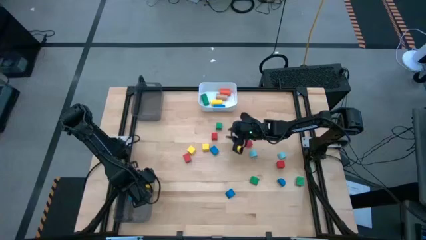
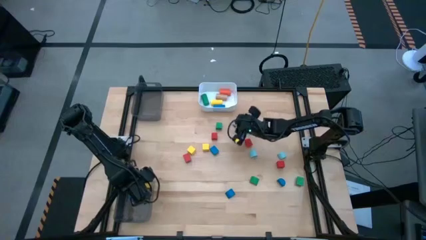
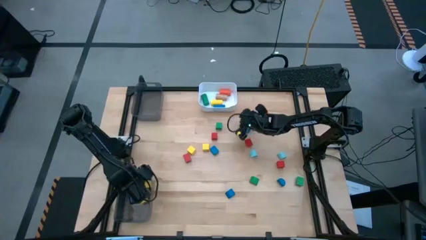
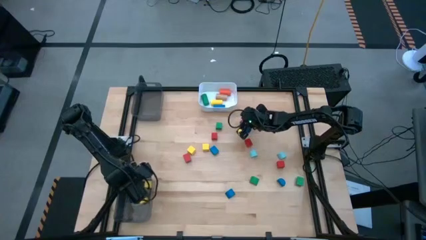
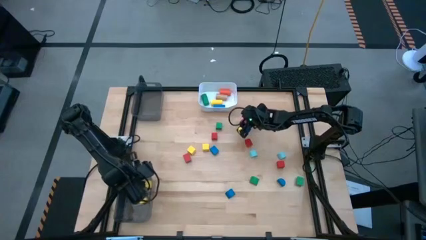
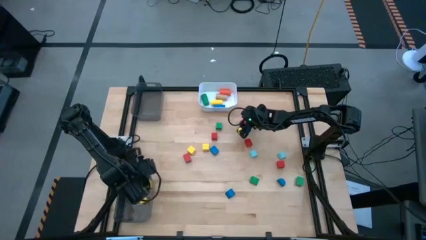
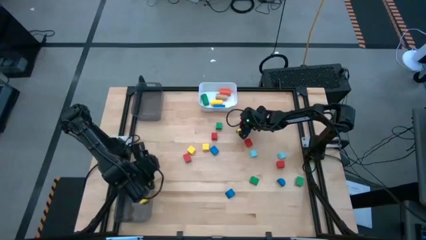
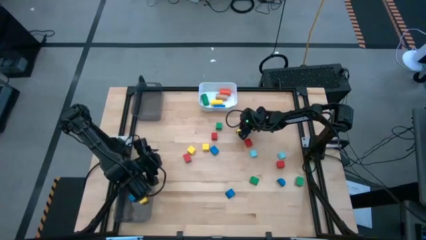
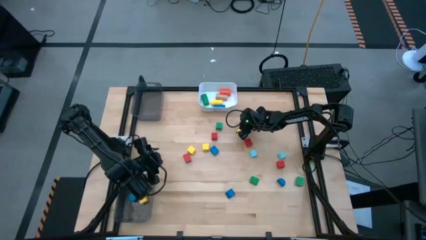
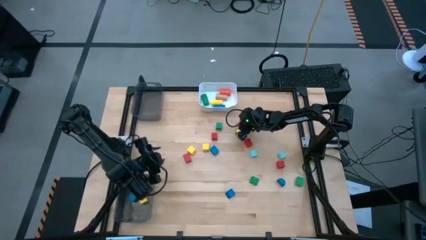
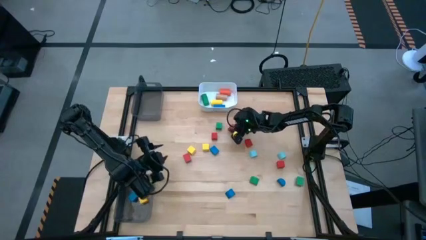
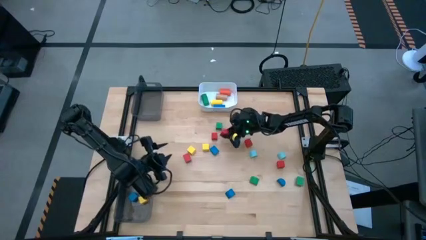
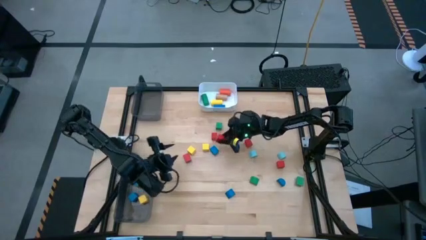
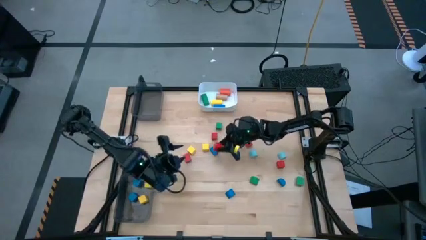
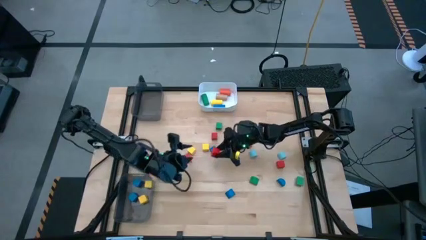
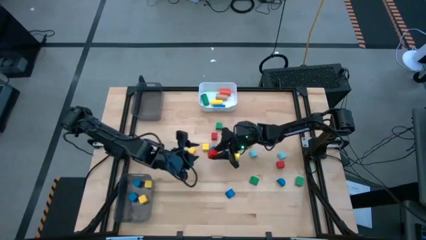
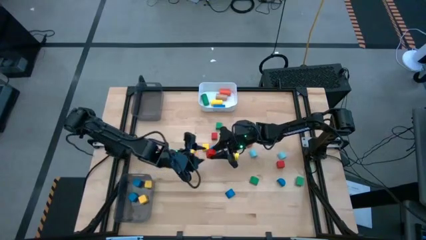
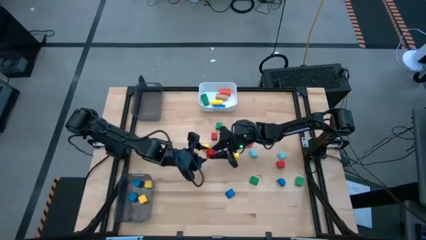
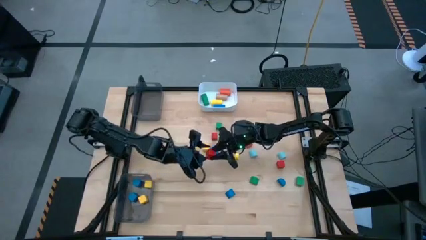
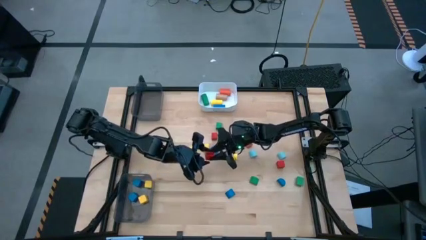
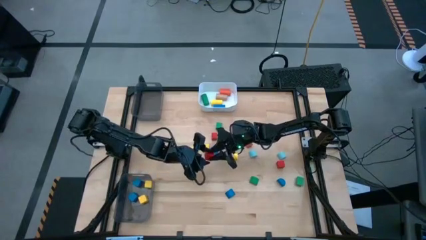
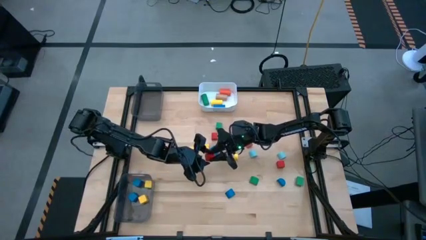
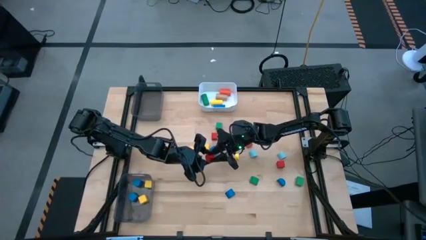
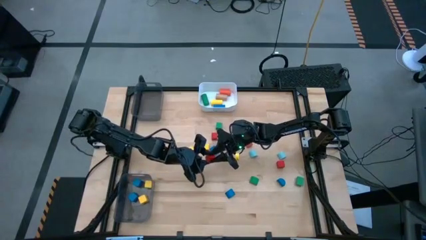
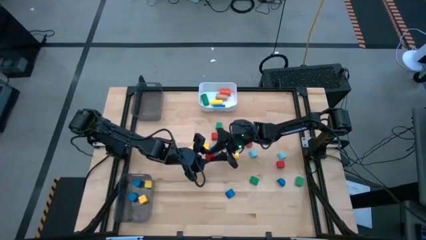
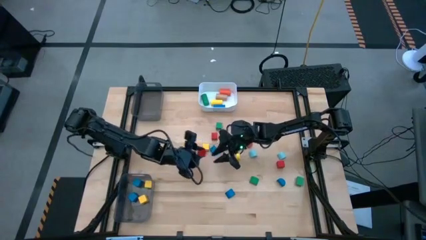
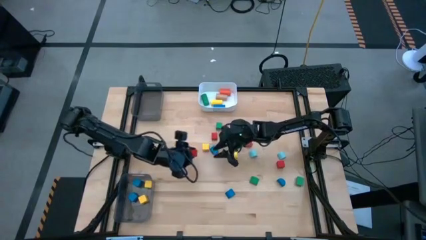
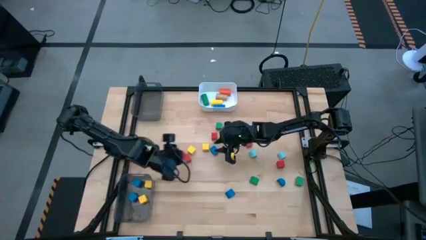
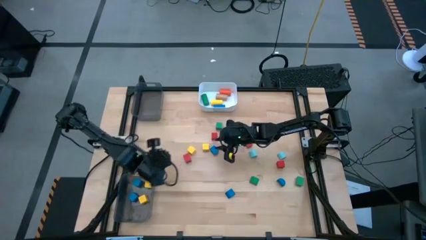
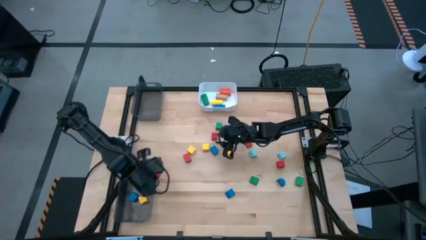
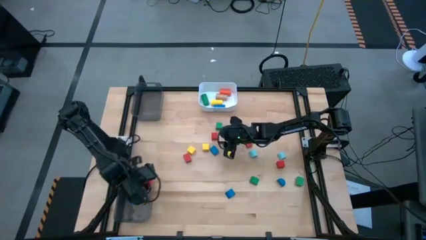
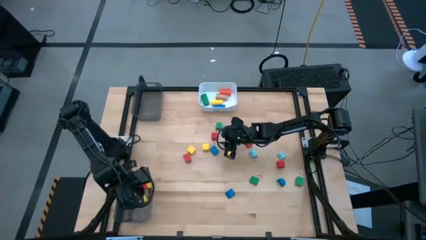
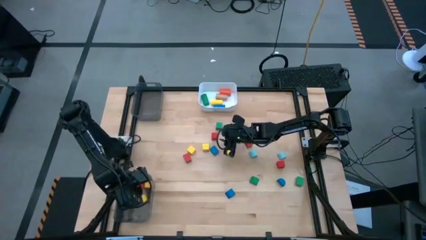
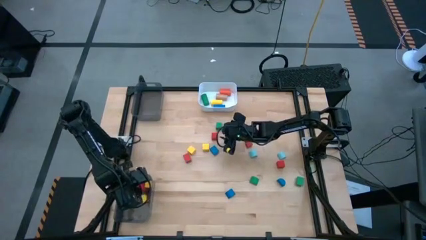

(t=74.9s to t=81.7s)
Task: Sort blocks by size
Put the red square block into the bottom black bin

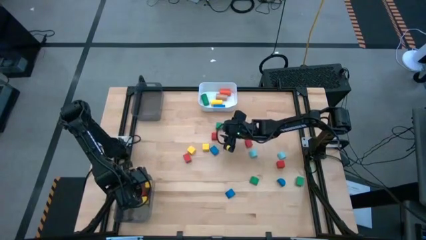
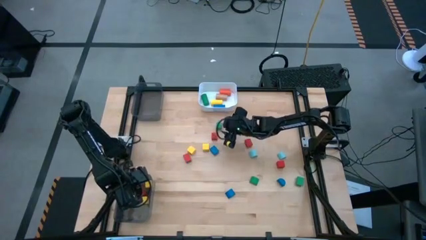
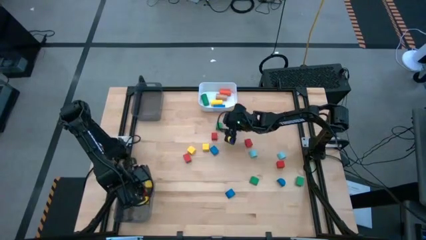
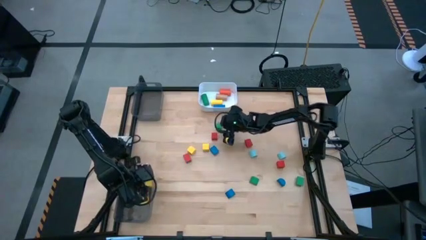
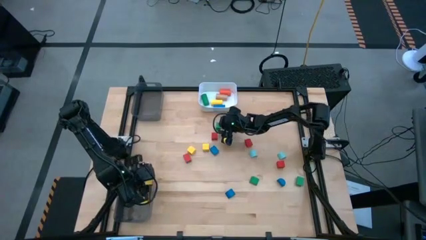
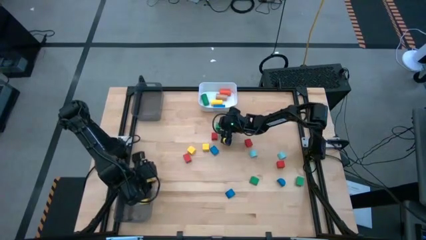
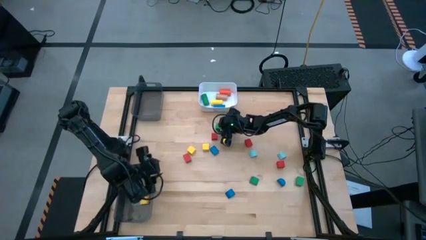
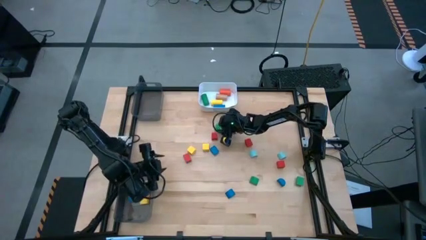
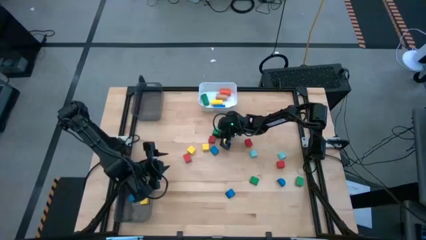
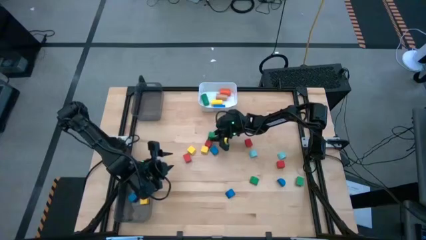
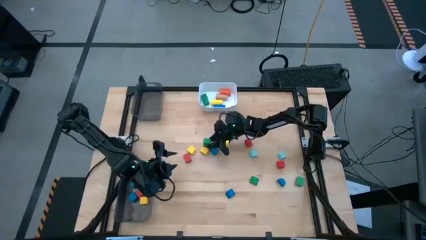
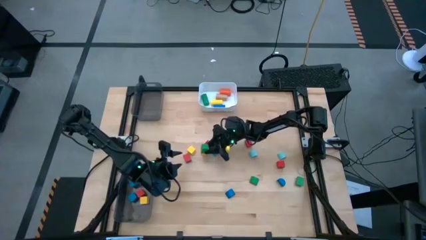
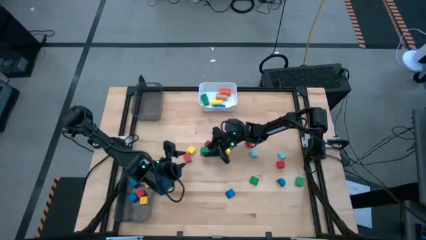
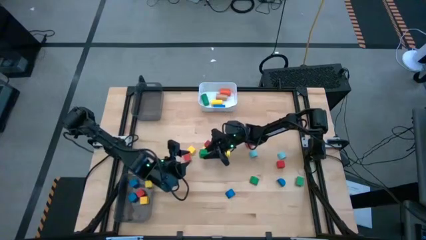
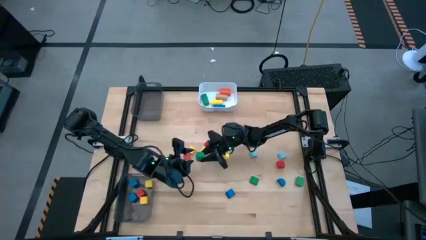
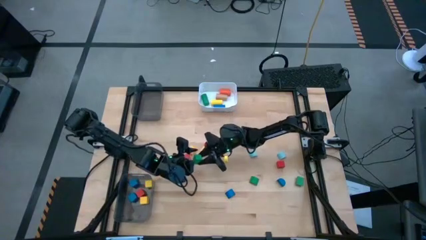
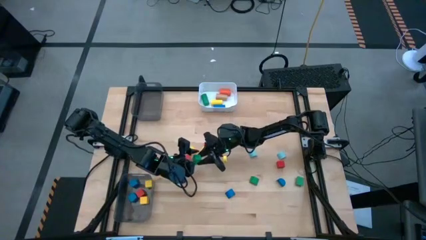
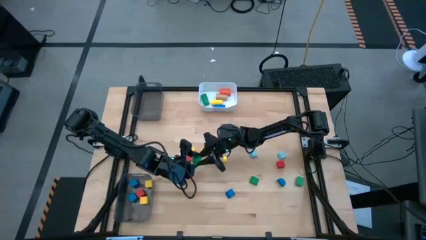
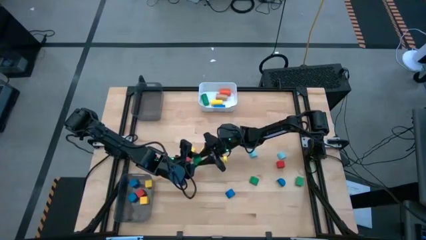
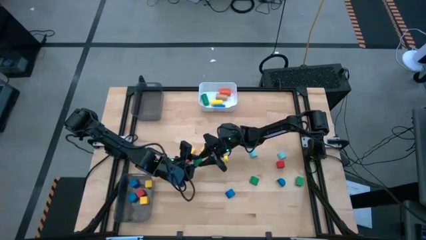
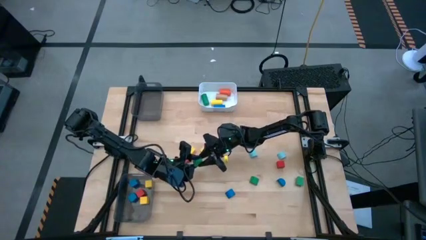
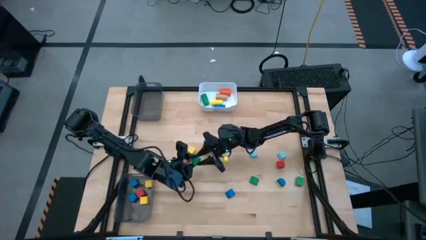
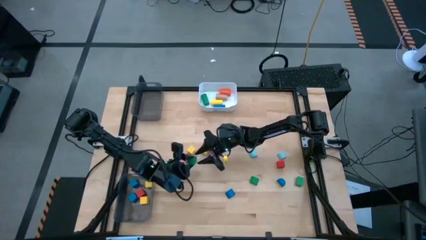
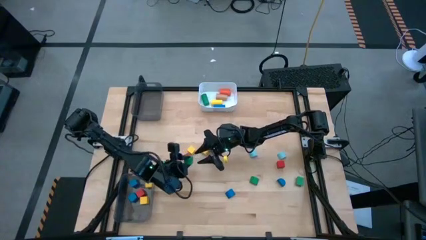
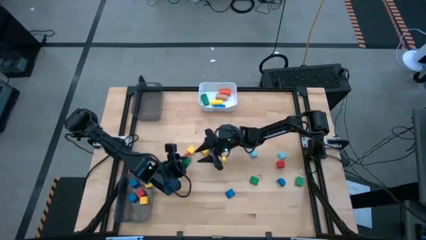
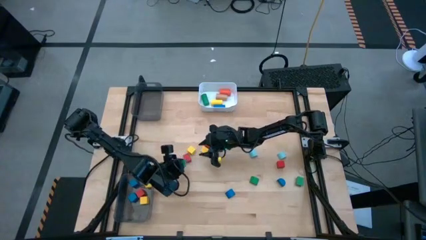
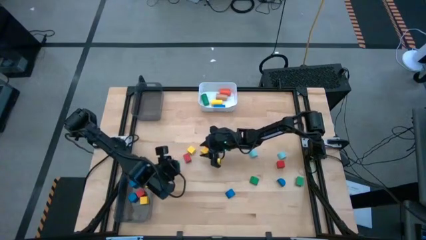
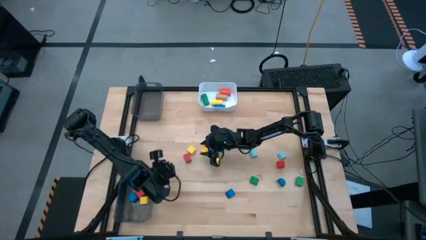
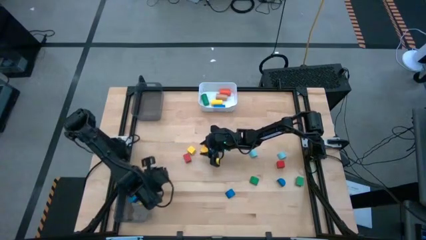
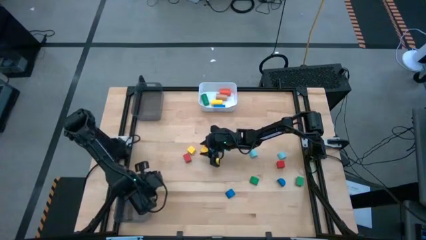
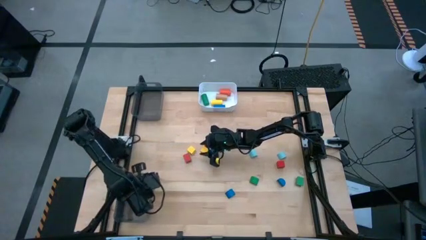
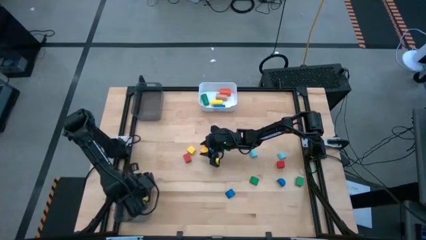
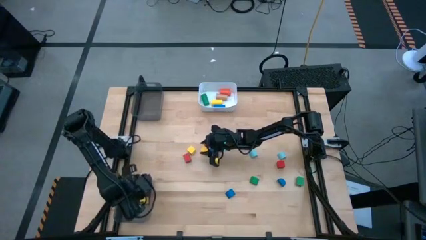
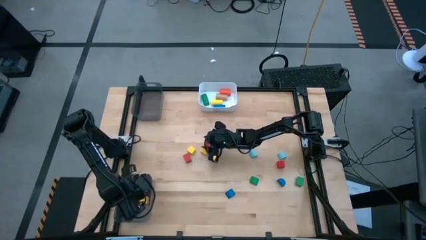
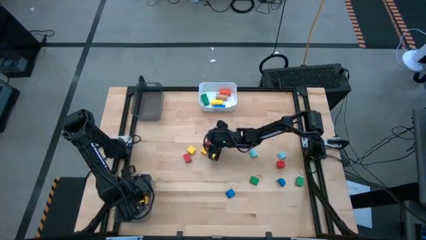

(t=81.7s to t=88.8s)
Put the green square block into the bottom black bin

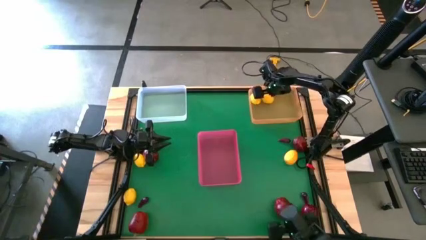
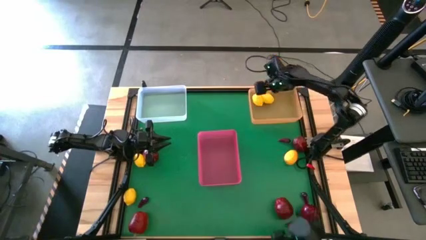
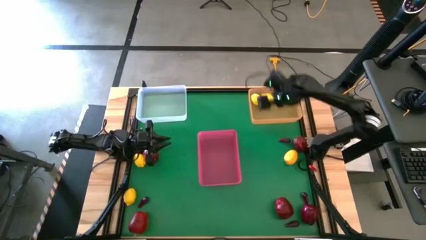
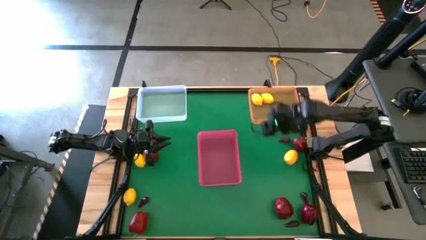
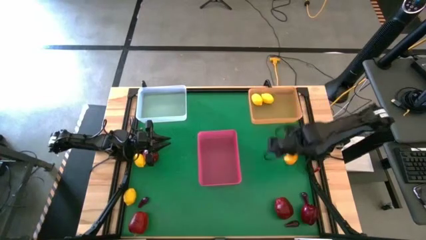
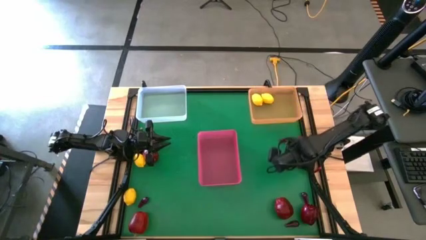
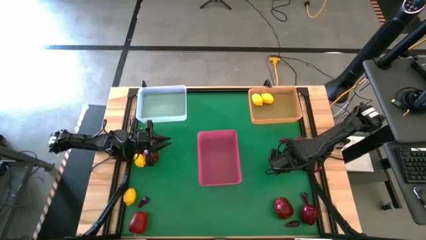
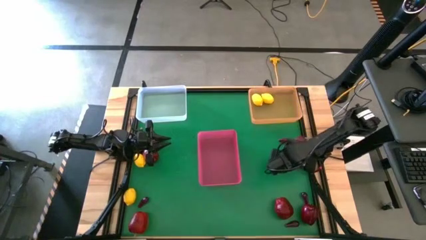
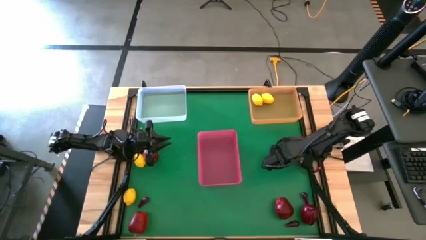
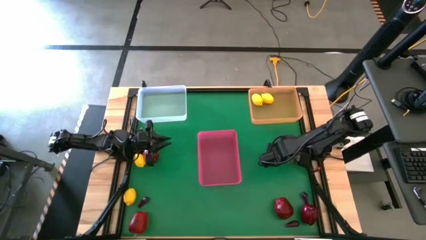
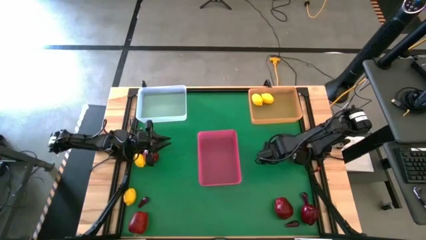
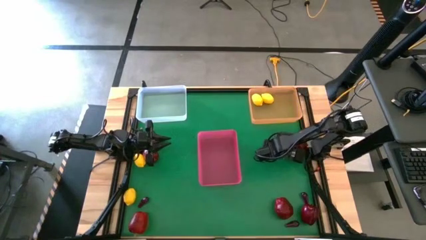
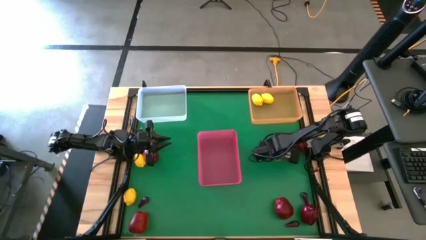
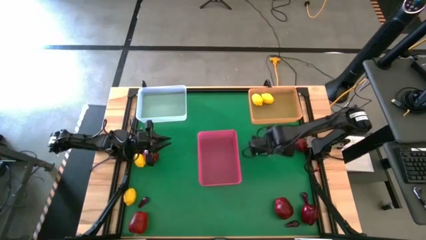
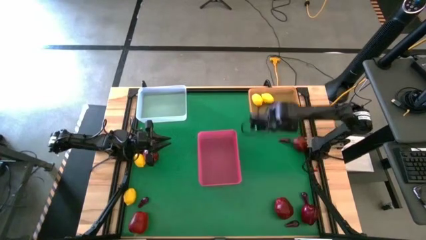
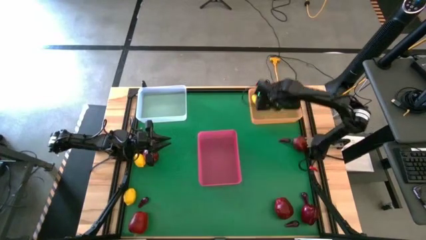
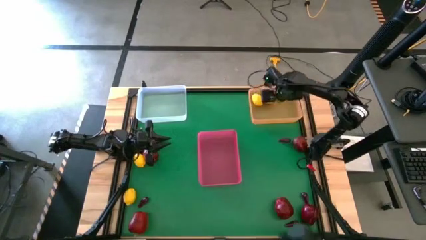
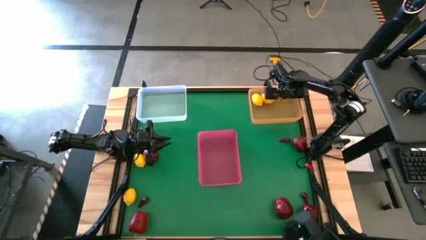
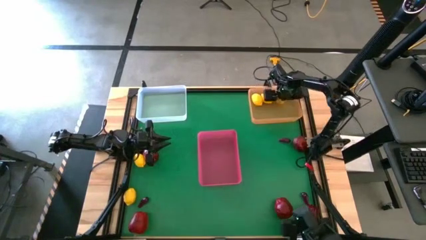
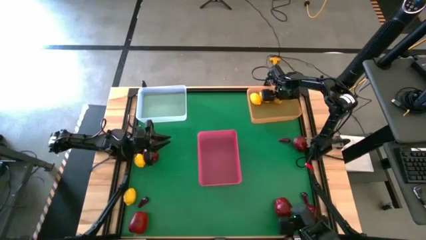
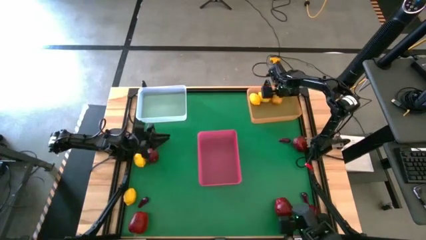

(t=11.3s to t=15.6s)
Task: Sort produce into baskets
Put the lemon into the orange bin
